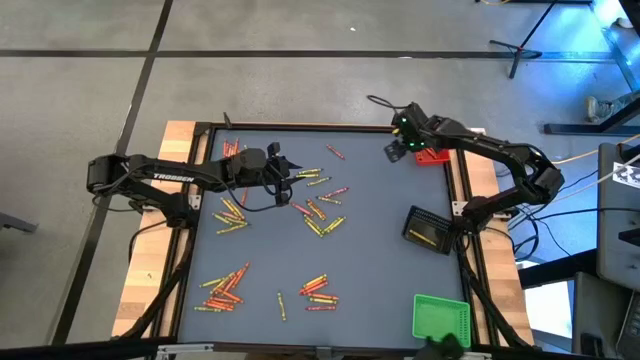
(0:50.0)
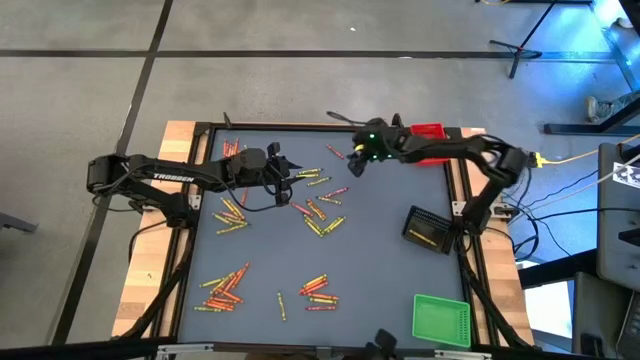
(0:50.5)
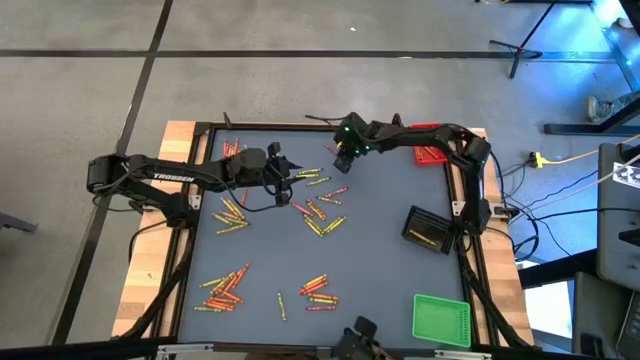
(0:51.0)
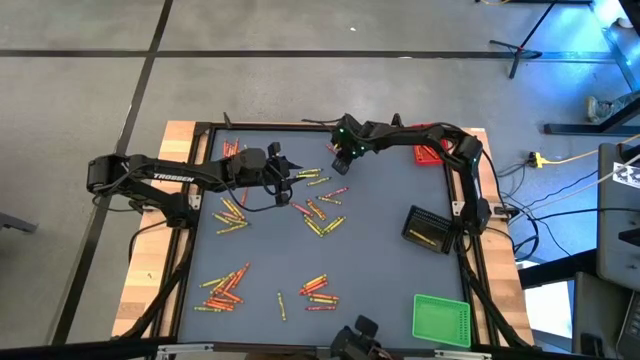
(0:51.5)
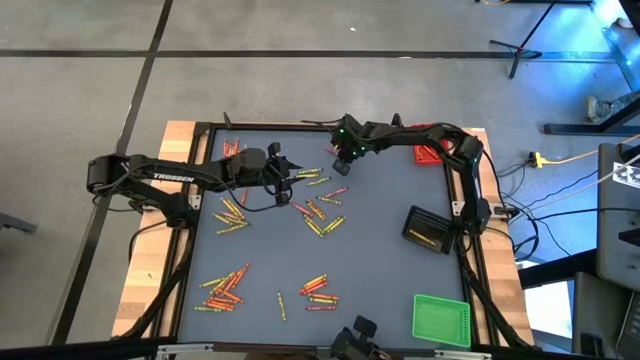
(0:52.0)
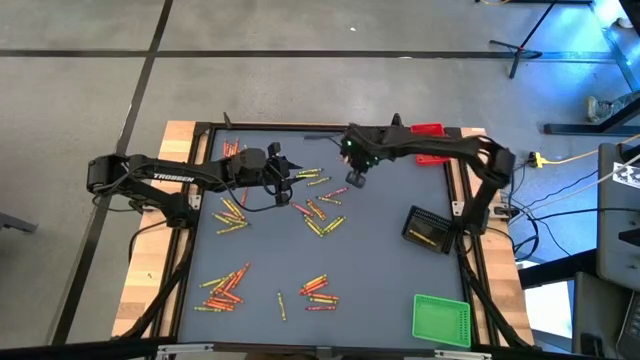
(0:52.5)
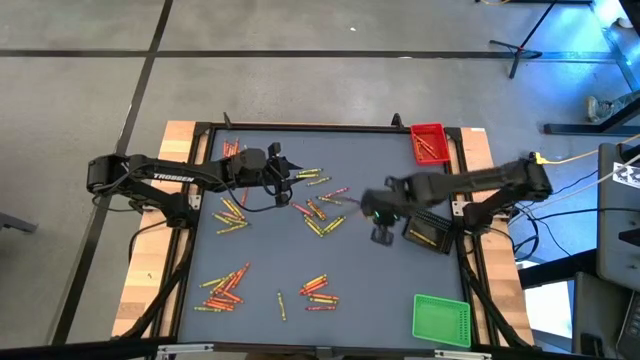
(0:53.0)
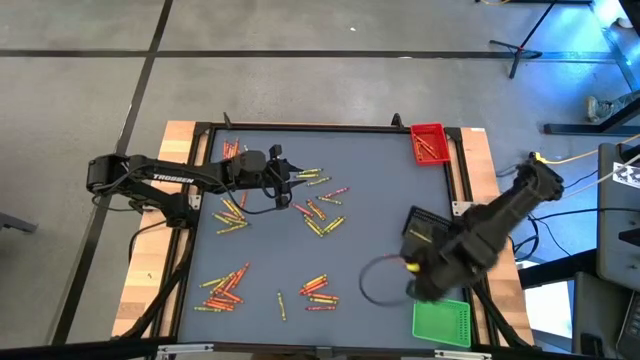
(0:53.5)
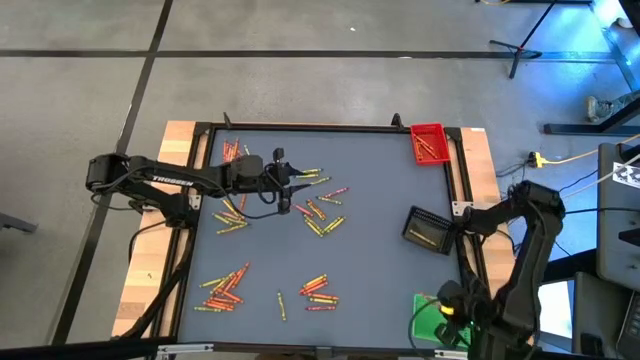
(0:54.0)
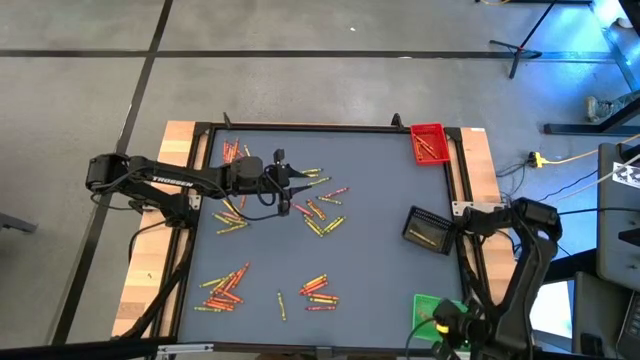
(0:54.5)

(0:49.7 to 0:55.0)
Task: Sort crayons
Put the red crayon into the green basket

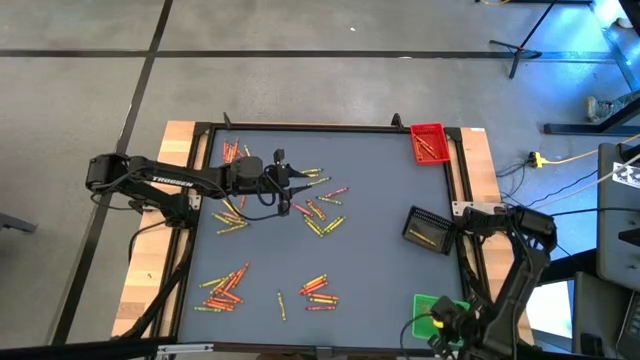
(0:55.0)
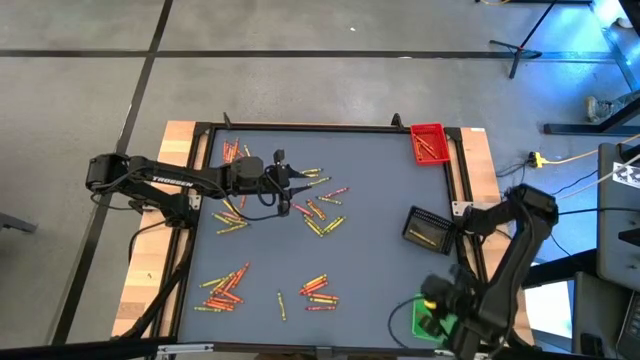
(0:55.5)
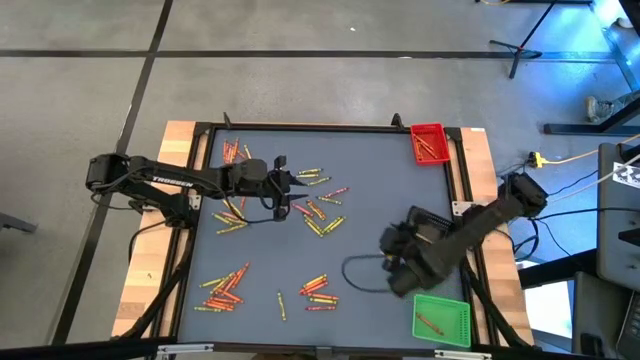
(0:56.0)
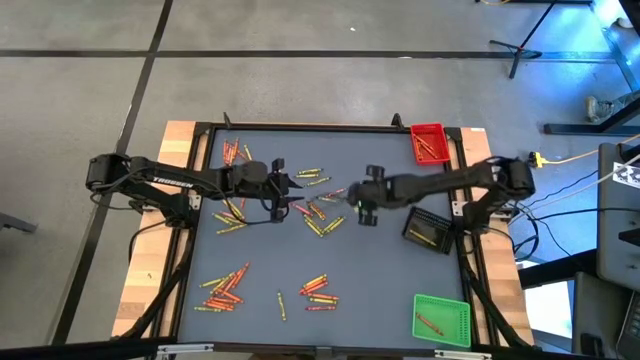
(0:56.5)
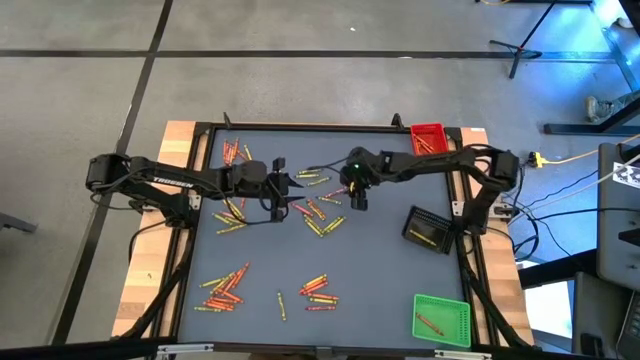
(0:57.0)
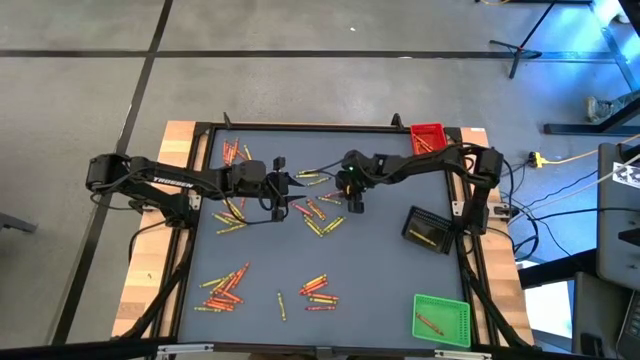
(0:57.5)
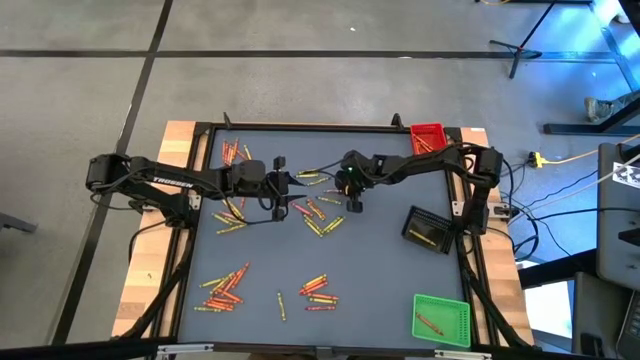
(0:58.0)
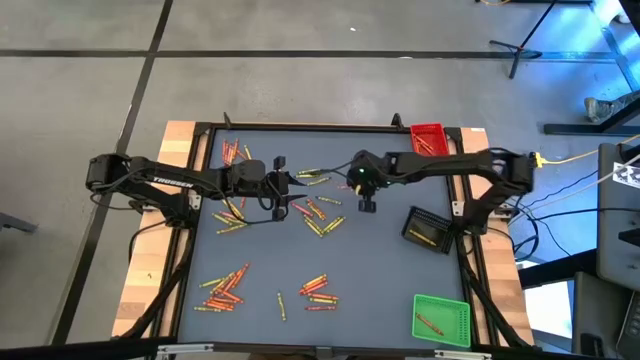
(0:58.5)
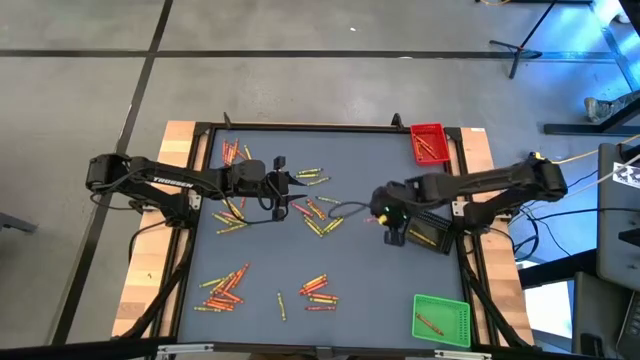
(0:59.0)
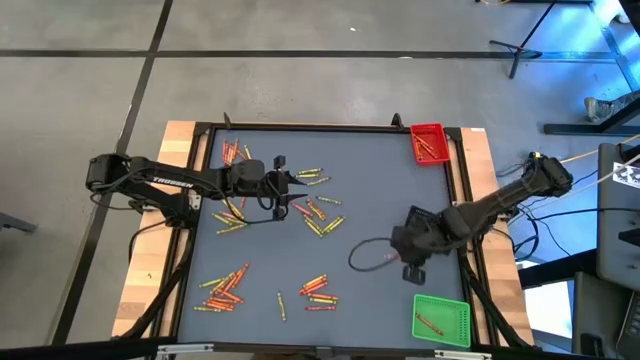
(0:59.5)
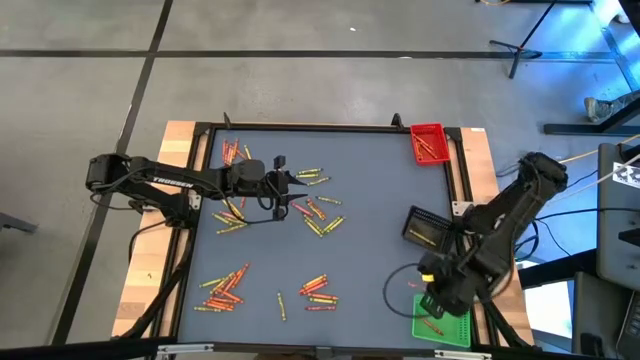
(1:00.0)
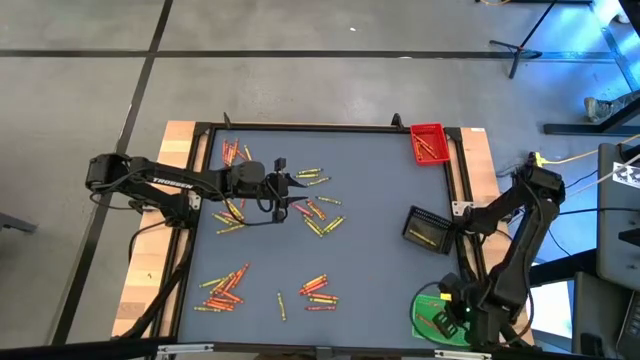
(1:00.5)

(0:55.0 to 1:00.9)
Put the red crayon into the green basket

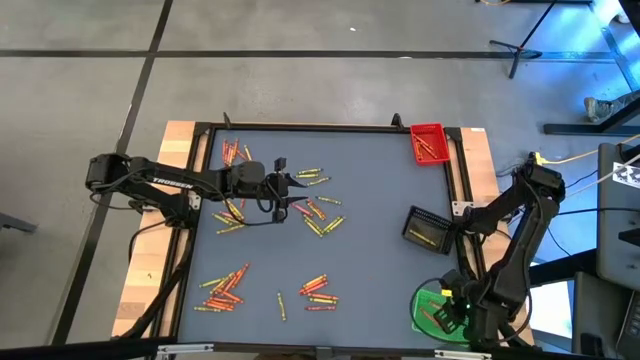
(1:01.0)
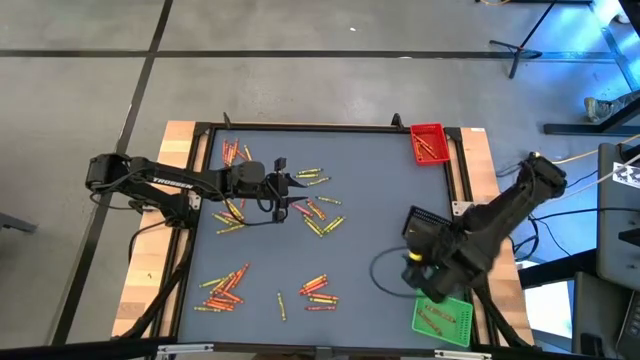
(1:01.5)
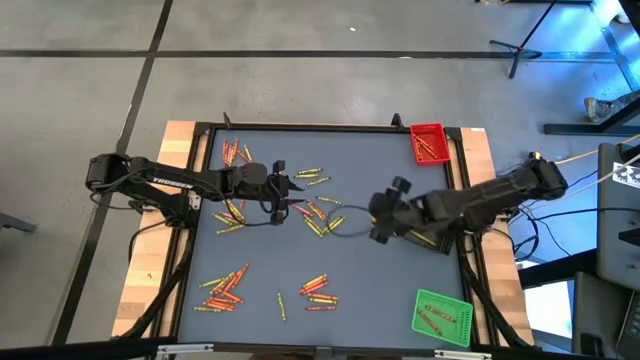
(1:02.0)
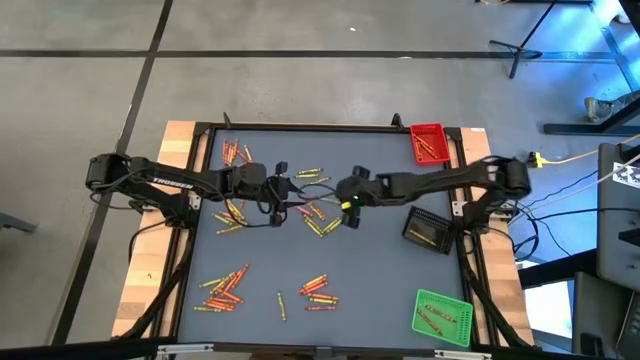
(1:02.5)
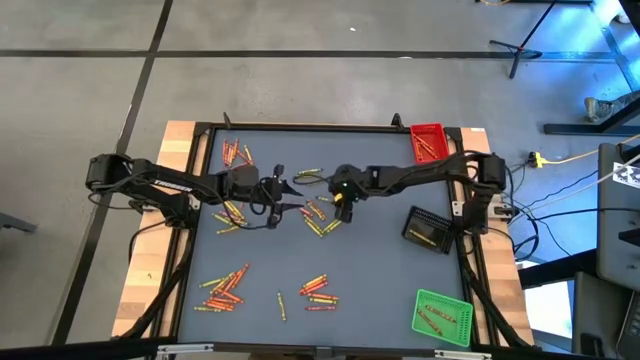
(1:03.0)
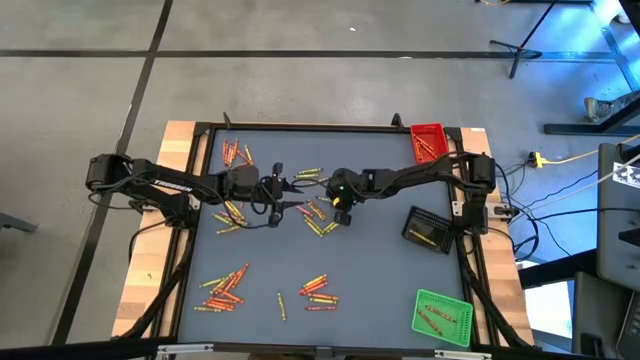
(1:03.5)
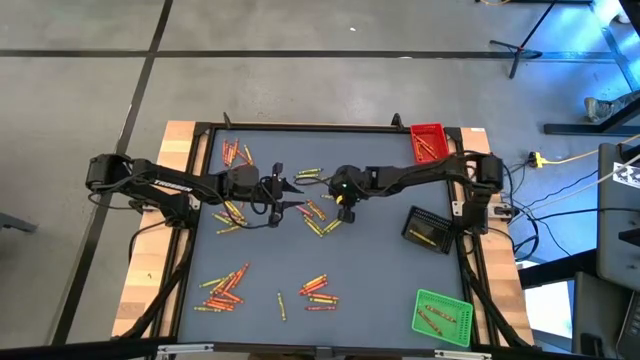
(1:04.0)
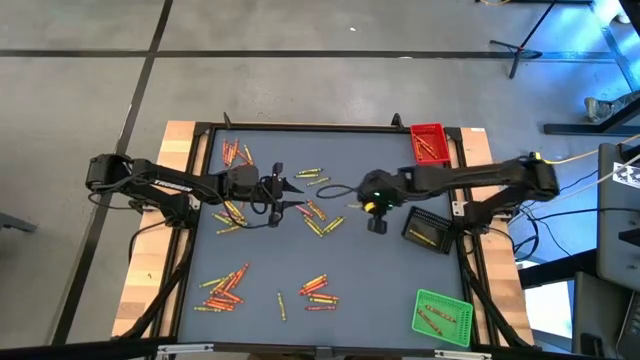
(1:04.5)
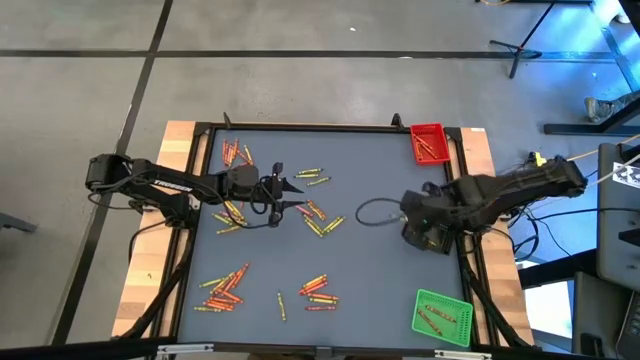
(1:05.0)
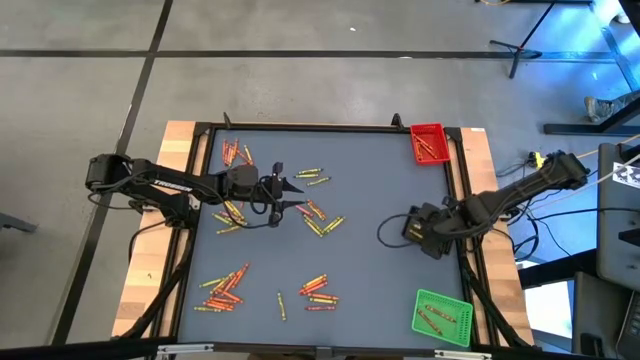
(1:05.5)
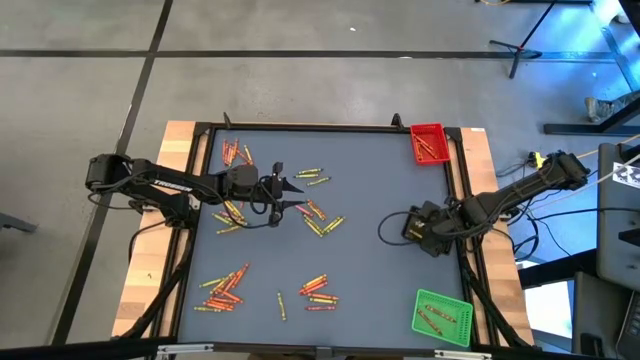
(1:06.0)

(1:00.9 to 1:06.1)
Put the green crayon into the black basket

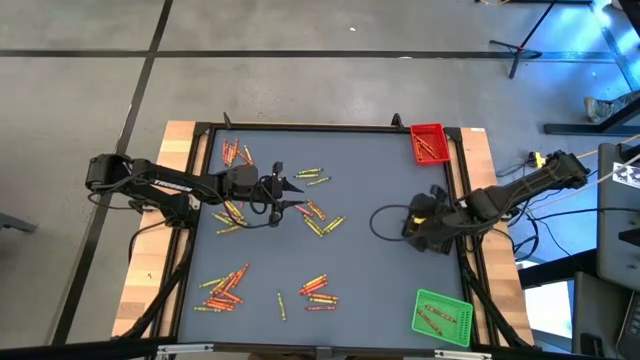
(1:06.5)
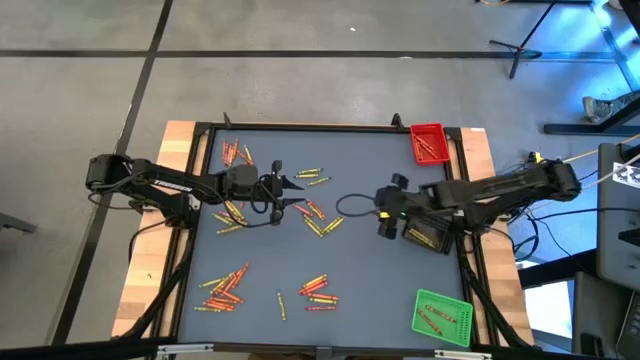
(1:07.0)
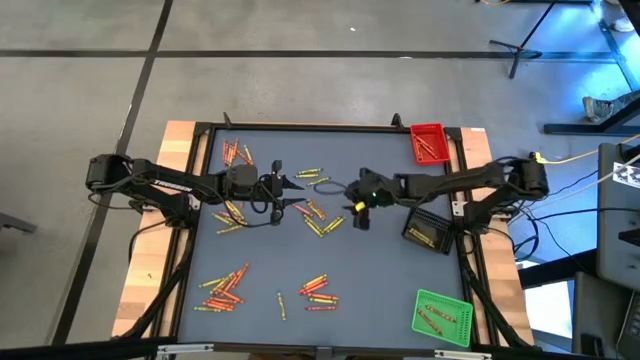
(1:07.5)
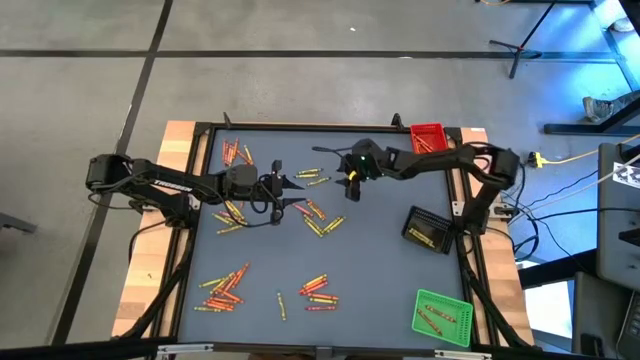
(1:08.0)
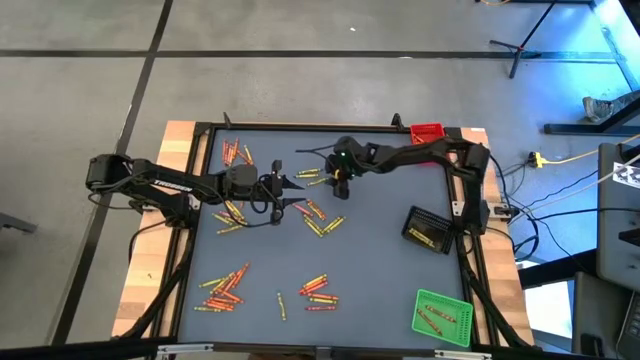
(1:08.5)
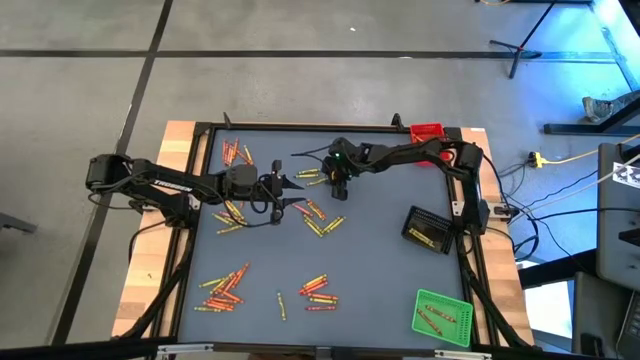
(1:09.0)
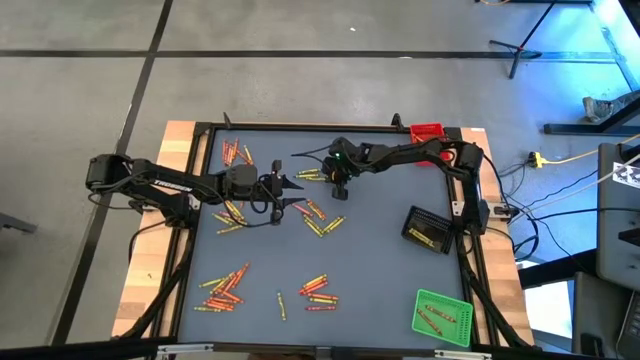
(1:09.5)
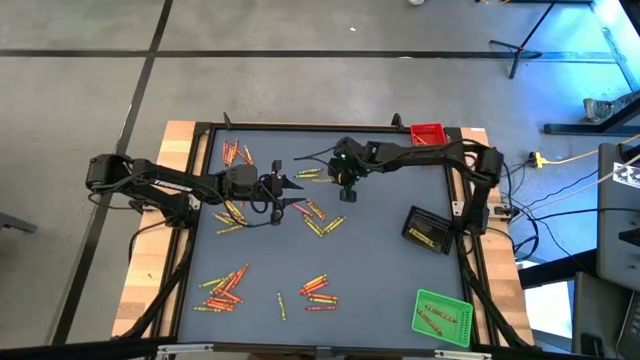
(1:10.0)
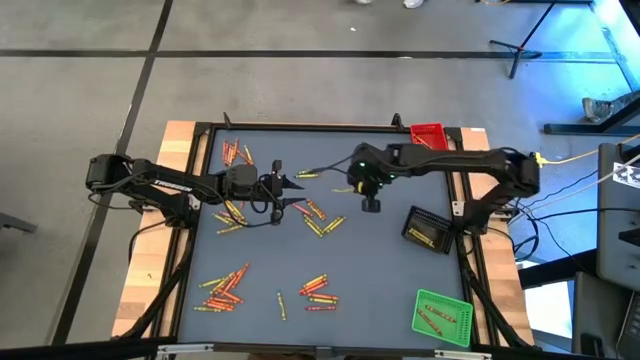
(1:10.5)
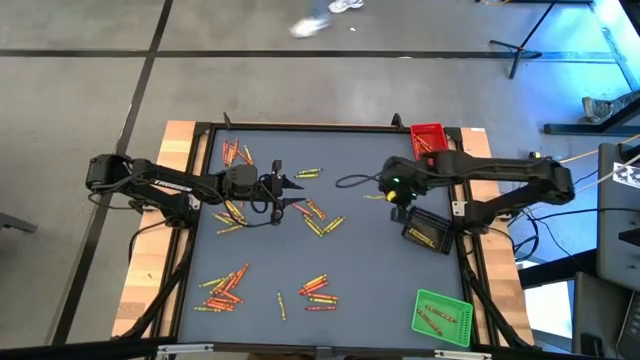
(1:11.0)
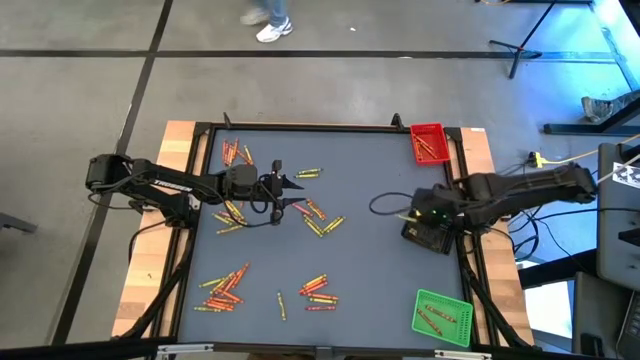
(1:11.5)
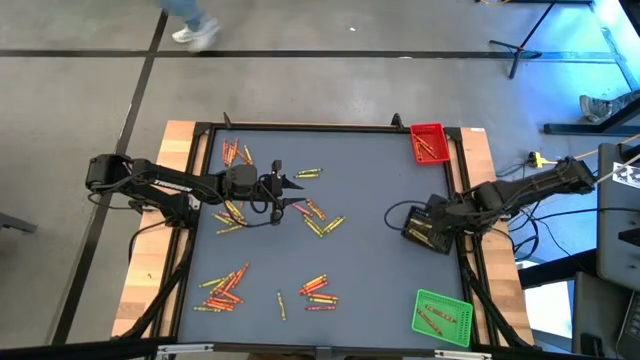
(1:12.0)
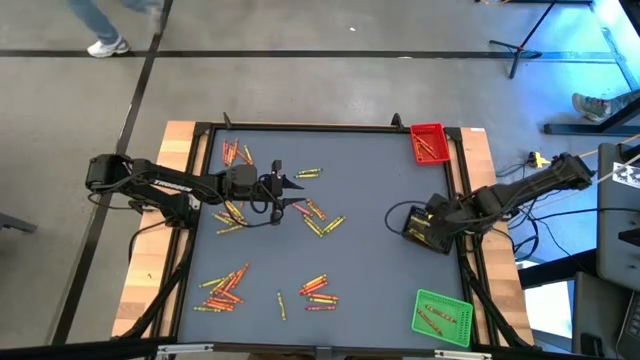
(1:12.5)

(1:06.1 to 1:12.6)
Put the green crayon into the black basket
